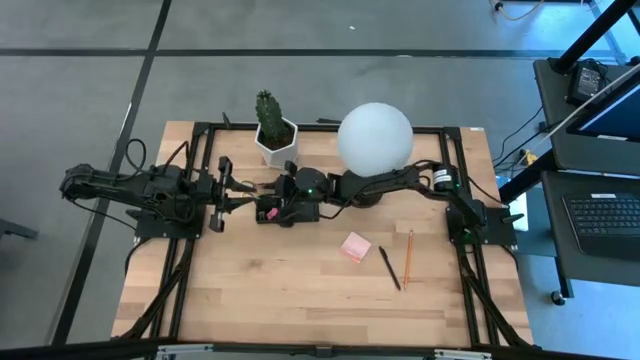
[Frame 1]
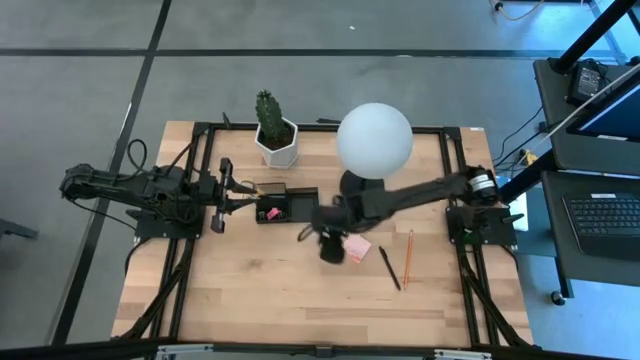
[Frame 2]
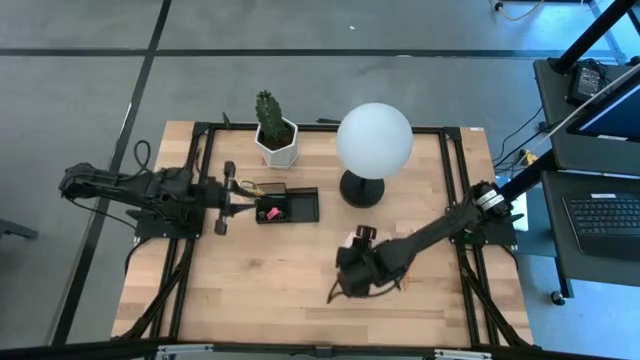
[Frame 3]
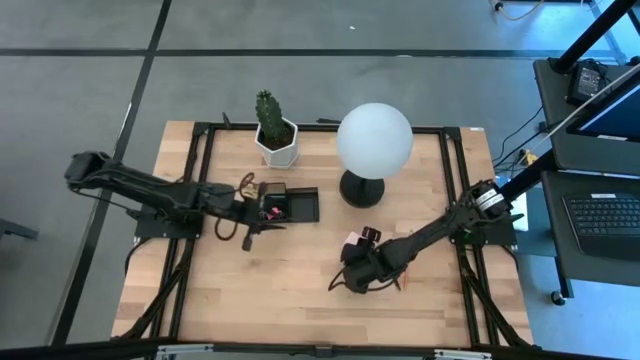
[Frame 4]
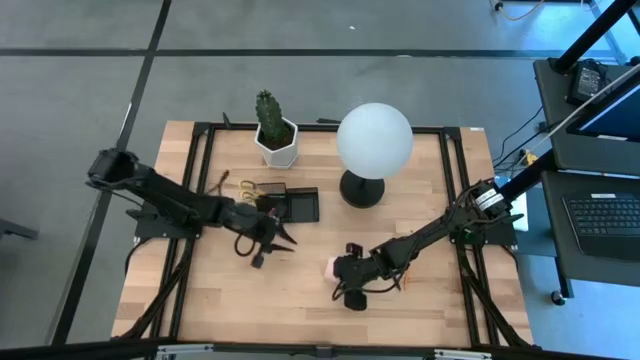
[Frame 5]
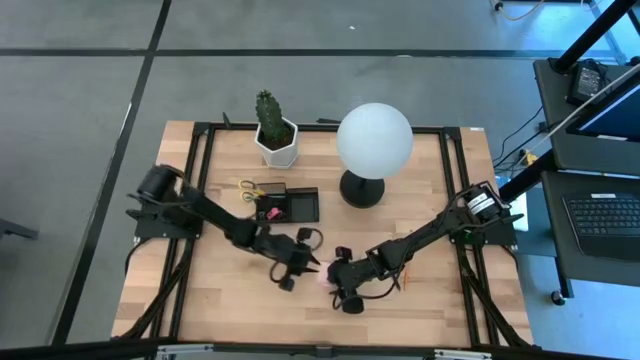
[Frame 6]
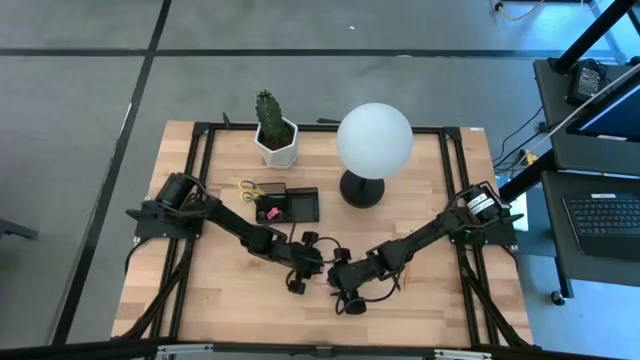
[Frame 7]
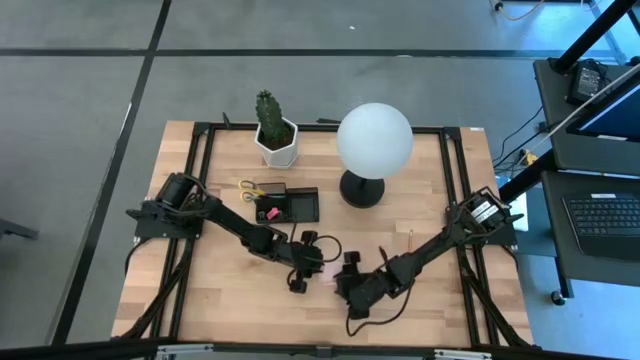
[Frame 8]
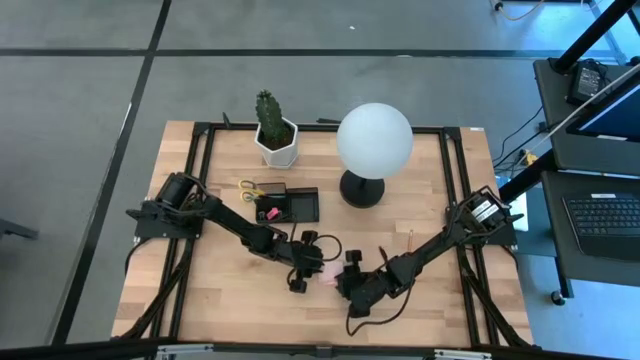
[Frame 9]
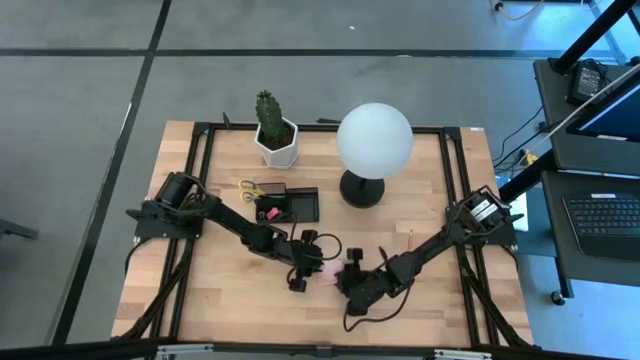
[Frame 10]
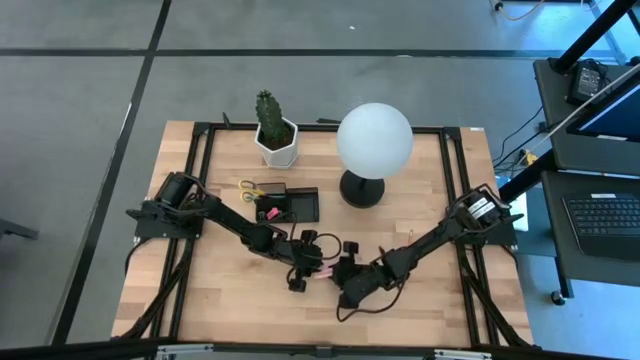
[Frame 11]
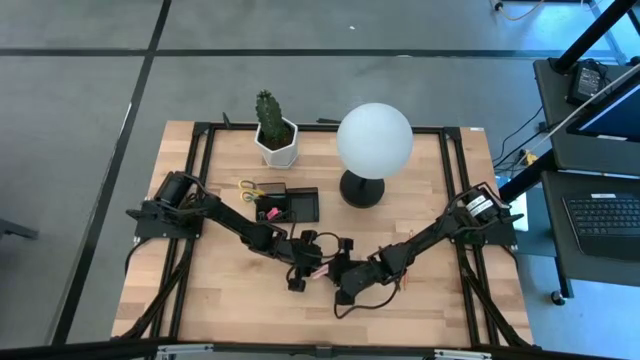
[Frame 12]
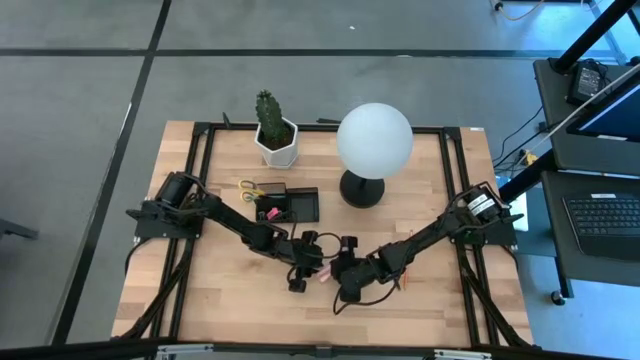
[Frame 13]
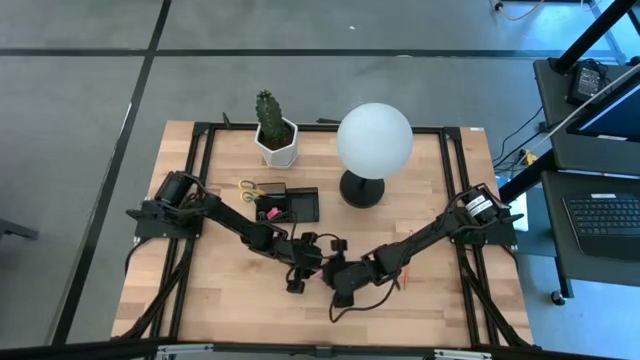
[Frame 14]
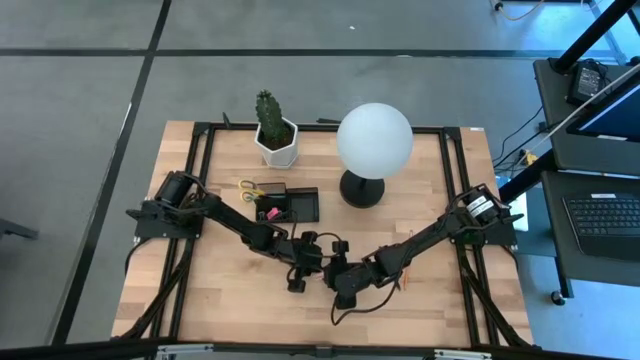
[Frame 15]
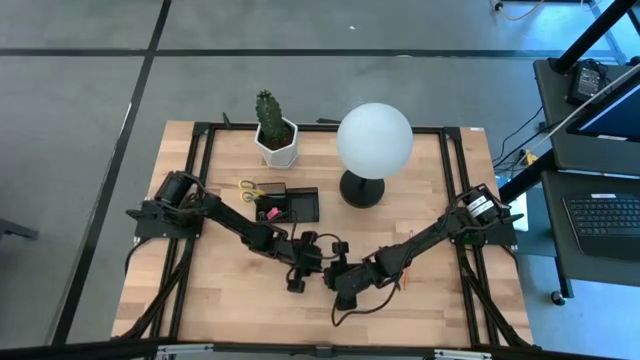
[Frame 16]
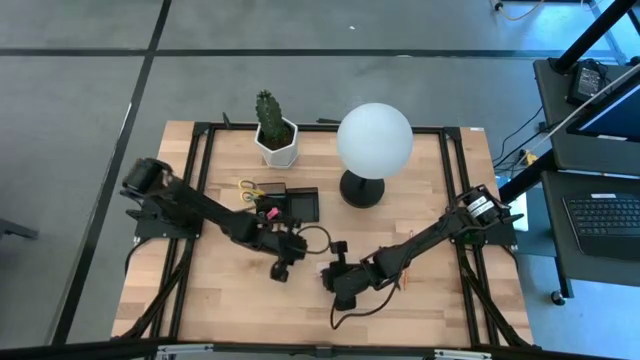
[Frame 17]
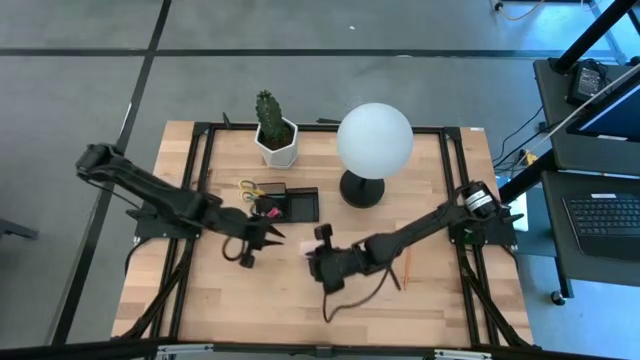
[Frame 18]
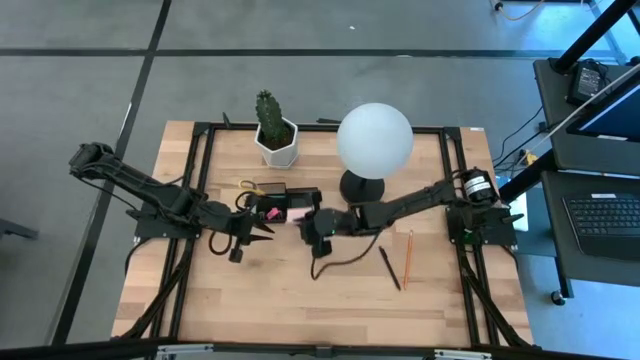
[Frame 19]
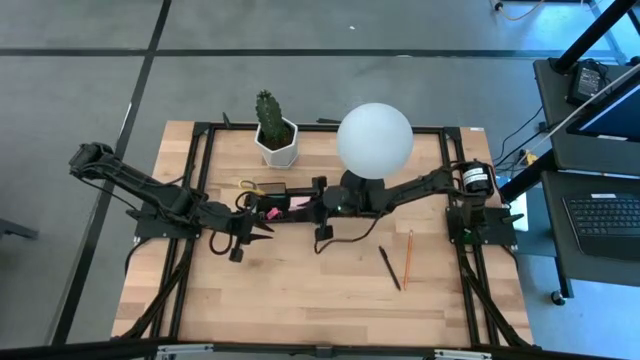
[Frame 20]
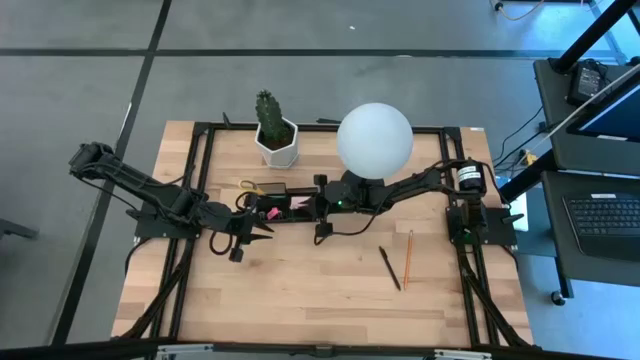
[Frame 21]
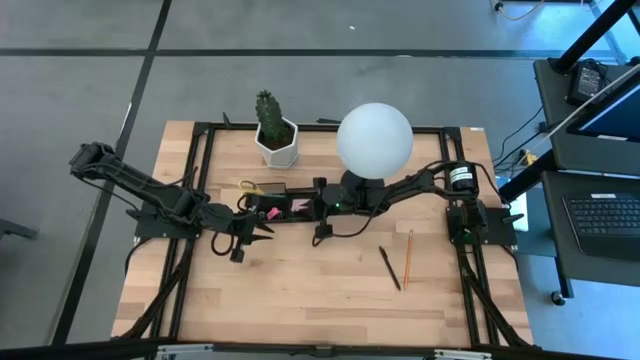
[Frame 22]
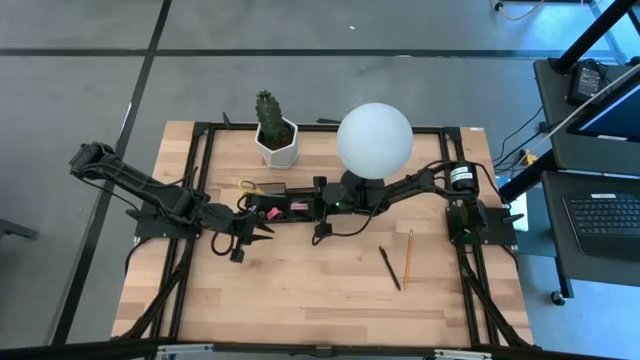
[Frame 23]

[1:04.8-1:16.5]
Task: Pick and place office supplies into organizer
Put the pink sticky notes into the black desk organizer

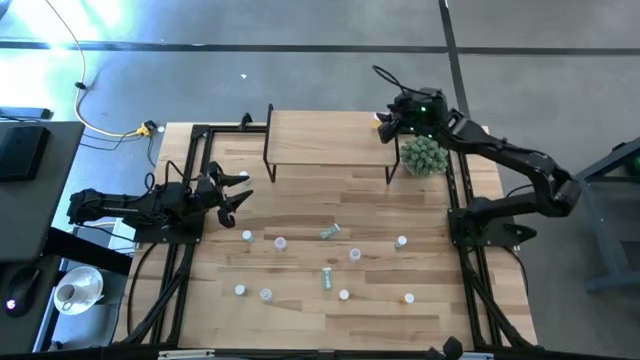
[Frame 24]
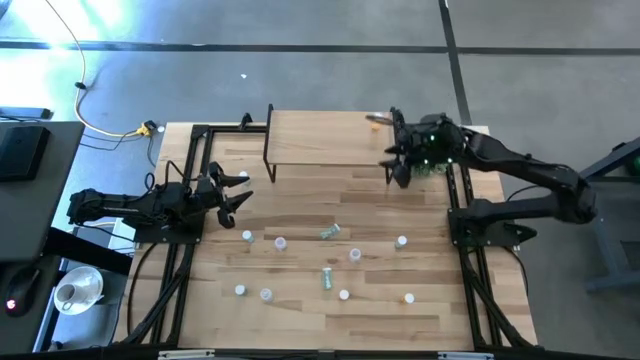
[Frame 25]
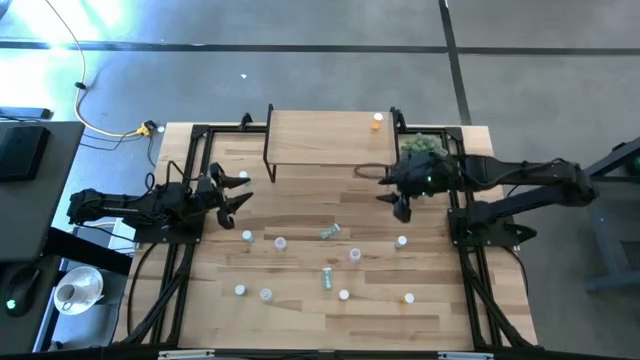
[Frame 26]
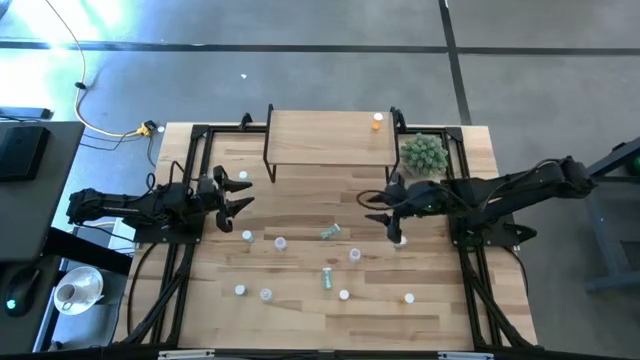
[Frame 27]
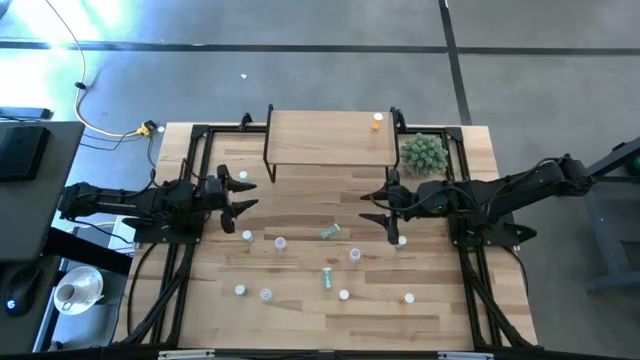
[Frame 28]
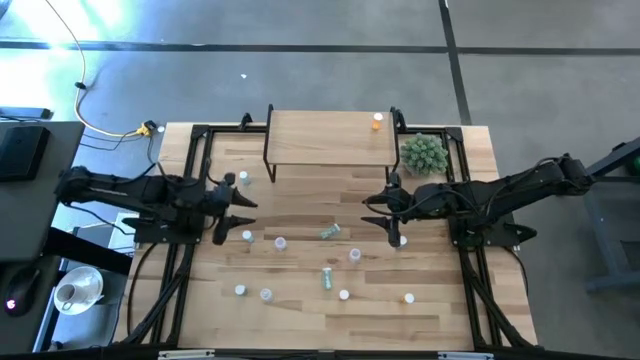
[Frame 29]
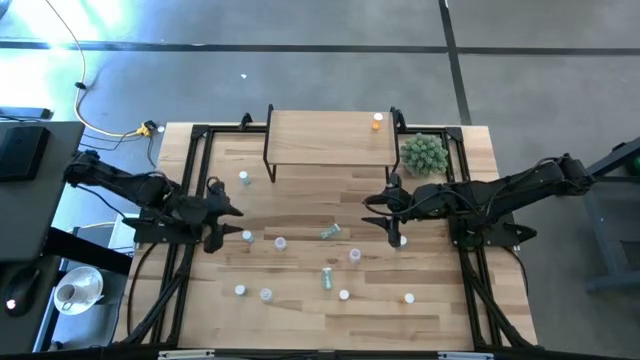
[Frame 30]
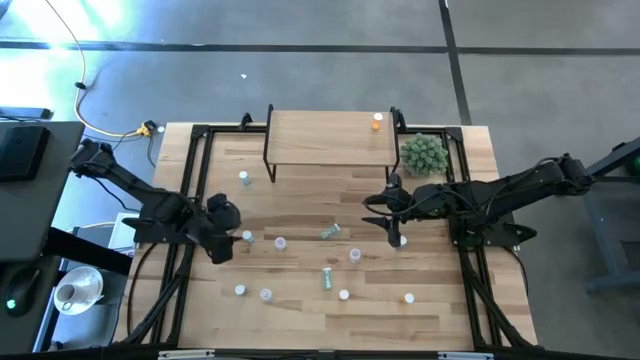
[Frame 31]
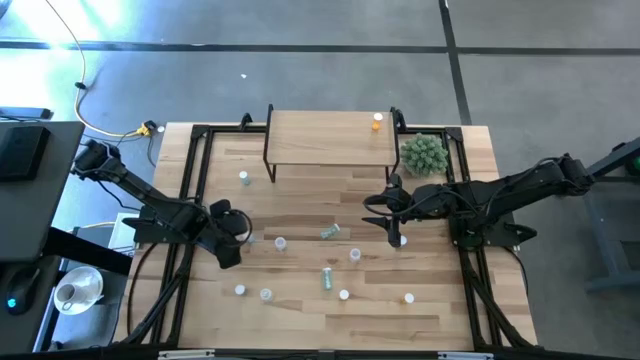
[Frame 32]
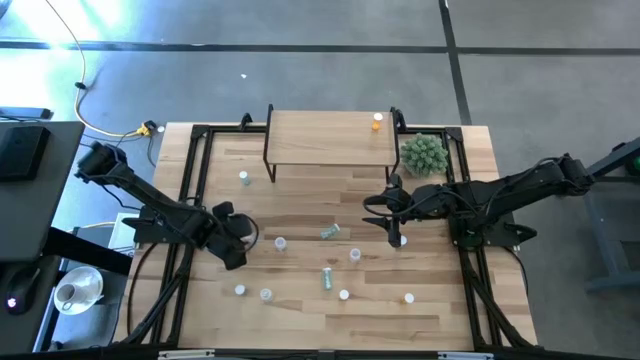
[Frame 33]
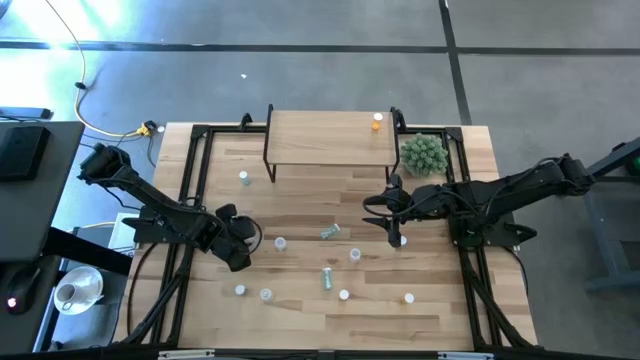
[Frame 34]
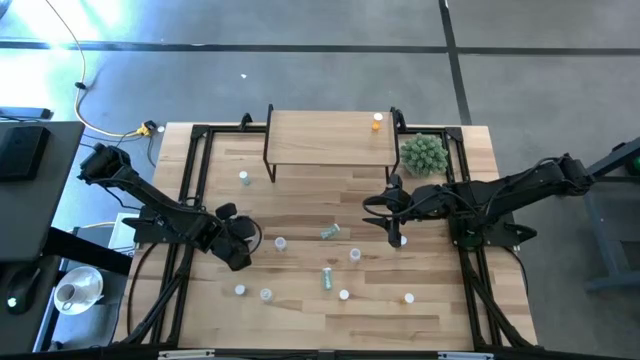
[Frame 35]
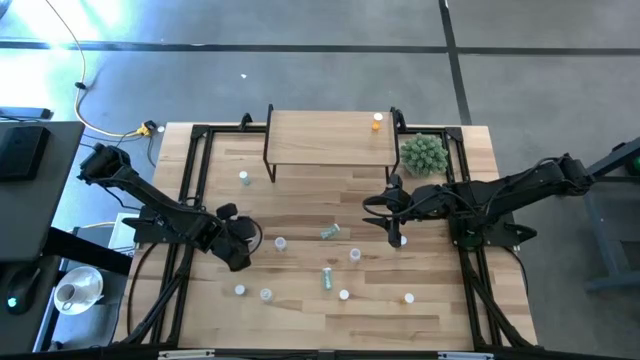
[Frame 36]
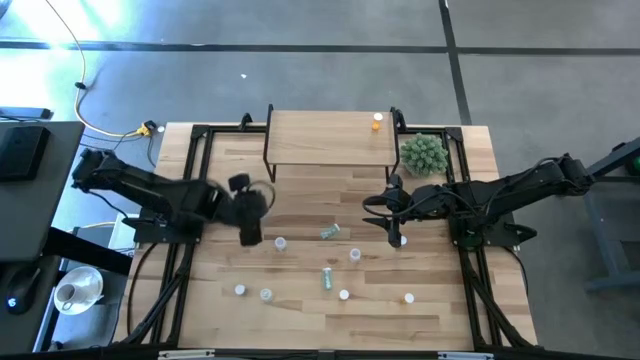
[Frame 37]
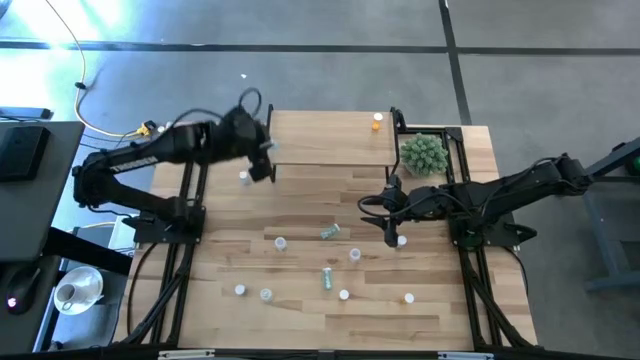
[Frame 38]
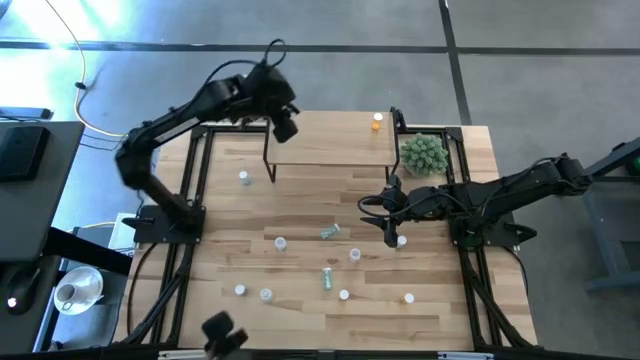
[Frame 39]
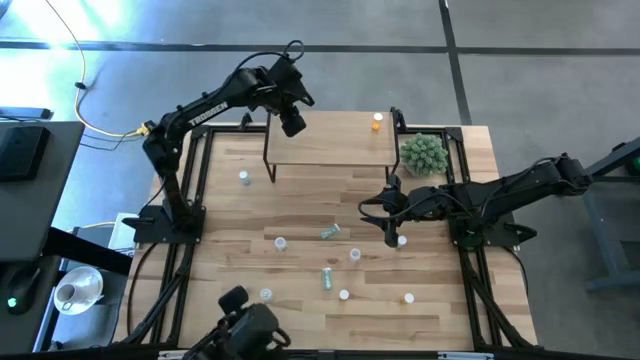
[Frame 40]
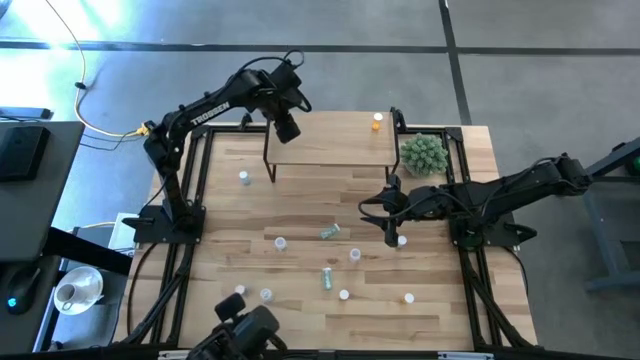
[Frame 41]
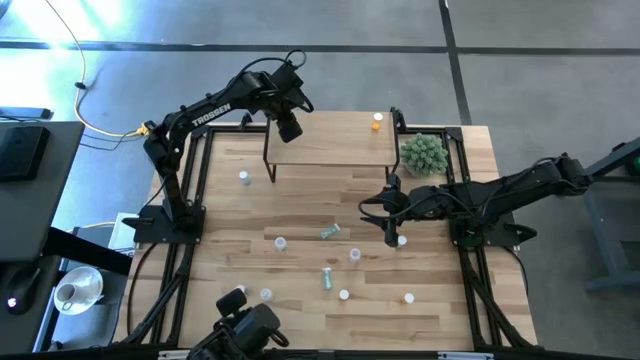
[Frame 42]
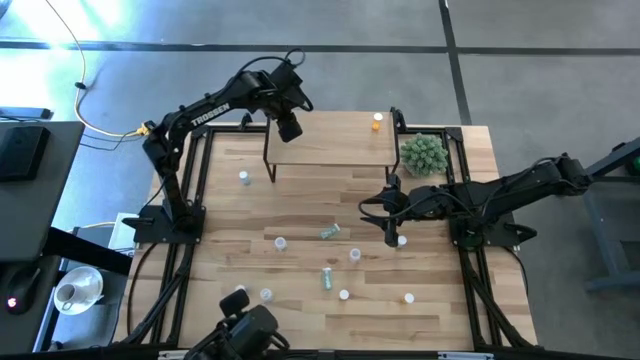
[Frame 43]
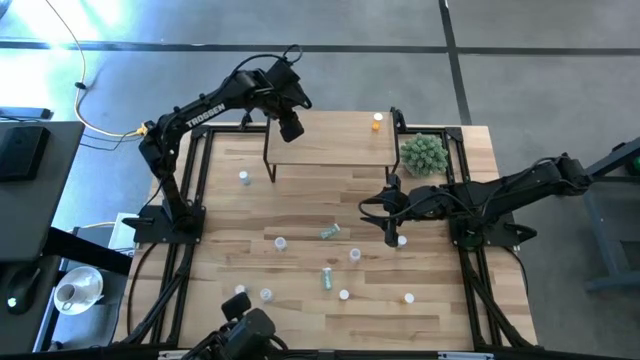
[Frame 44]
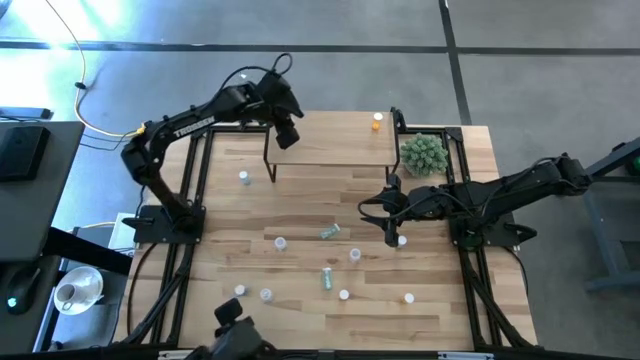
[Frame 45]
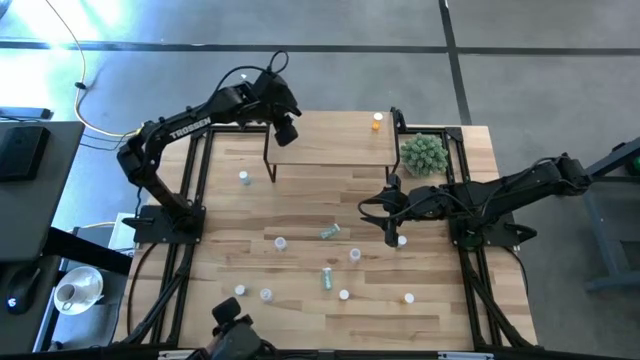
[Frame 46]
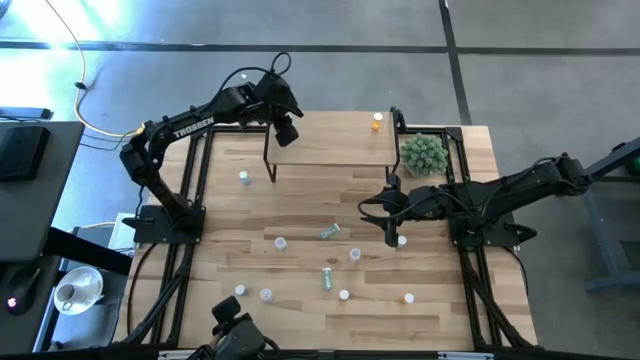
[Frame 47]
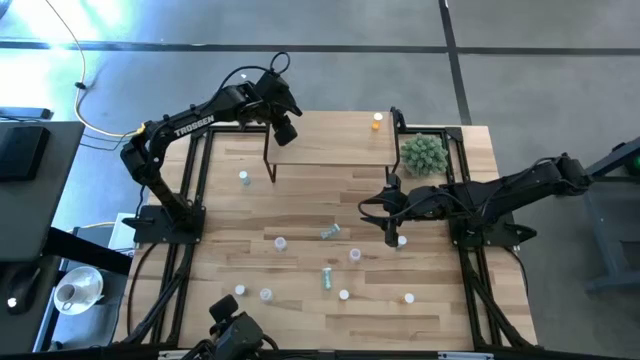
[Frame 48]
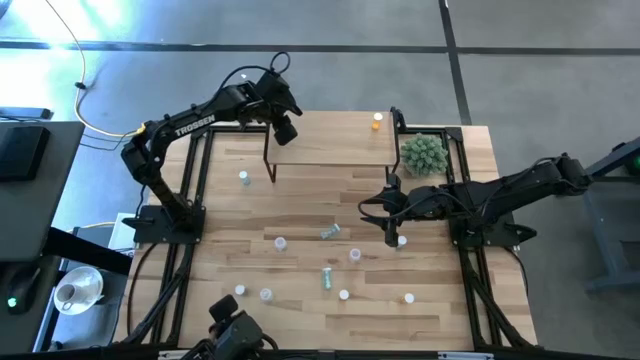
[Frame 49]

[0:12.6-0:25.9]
Task: Pick and place medicine bottles onto shelf by color
Put the middle blue pill bottle on the shelf
